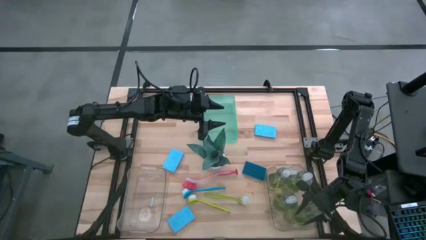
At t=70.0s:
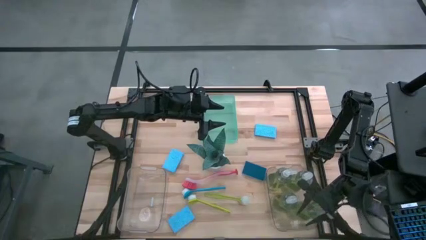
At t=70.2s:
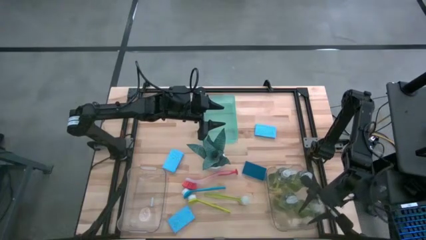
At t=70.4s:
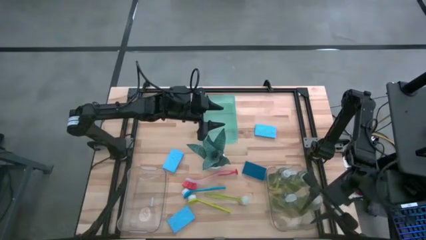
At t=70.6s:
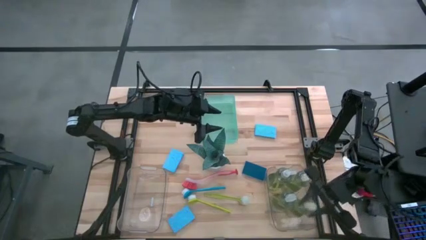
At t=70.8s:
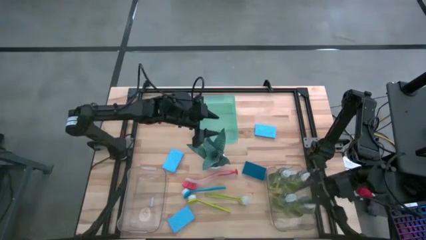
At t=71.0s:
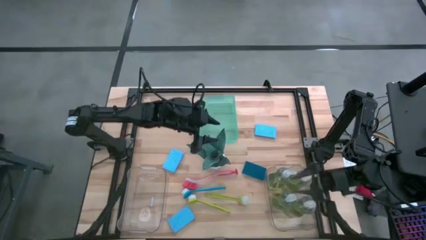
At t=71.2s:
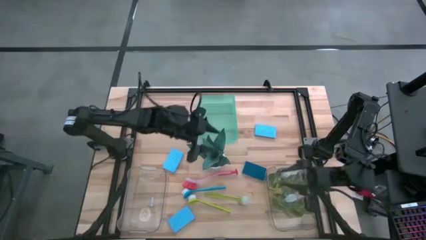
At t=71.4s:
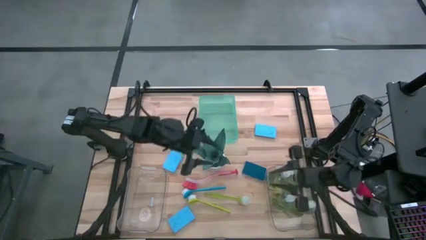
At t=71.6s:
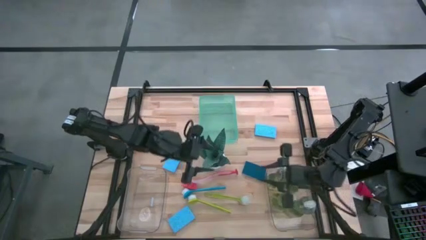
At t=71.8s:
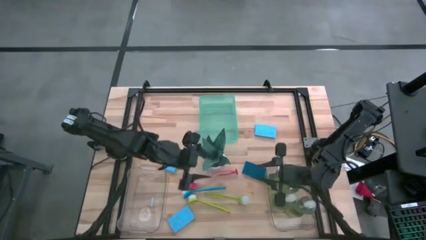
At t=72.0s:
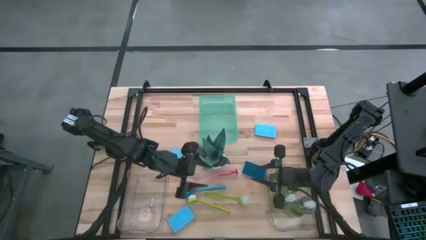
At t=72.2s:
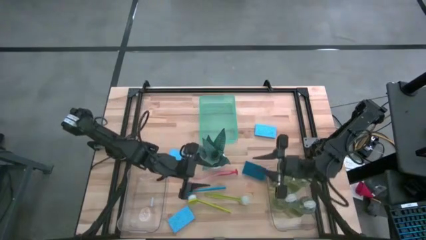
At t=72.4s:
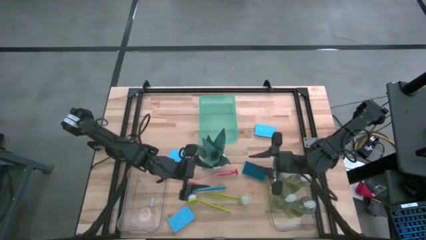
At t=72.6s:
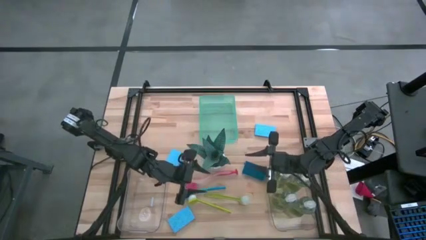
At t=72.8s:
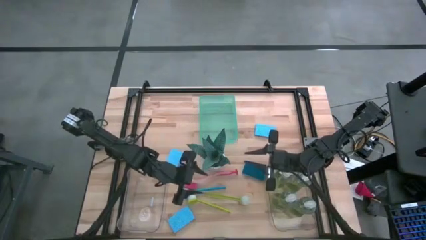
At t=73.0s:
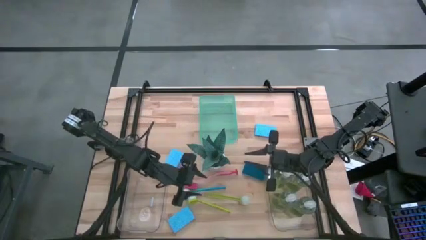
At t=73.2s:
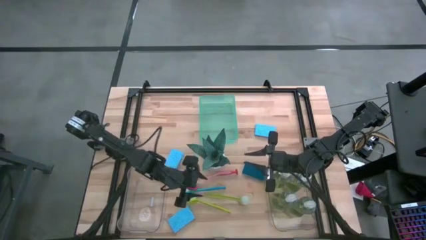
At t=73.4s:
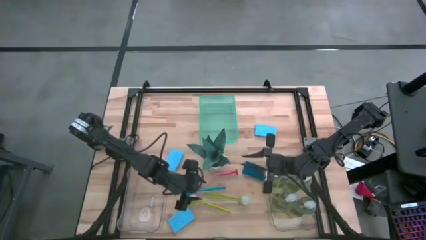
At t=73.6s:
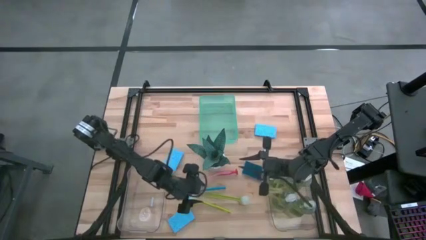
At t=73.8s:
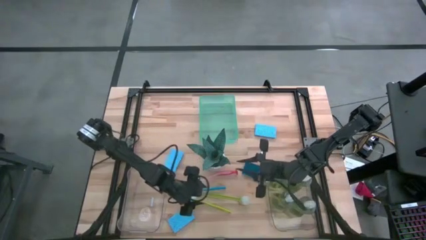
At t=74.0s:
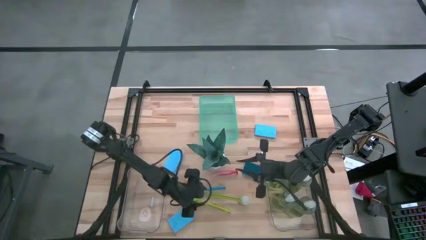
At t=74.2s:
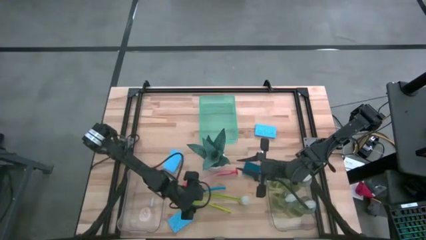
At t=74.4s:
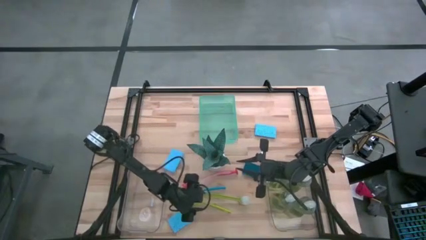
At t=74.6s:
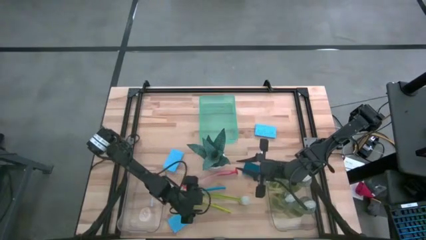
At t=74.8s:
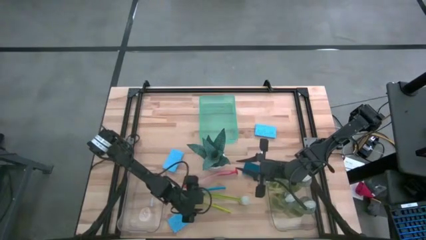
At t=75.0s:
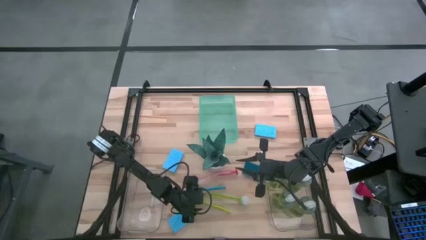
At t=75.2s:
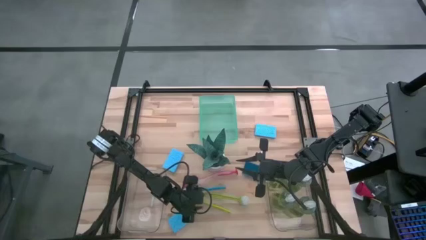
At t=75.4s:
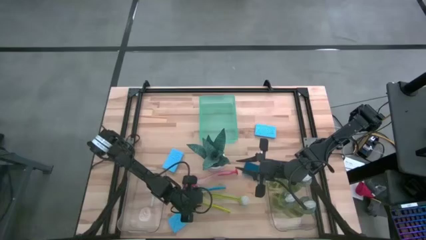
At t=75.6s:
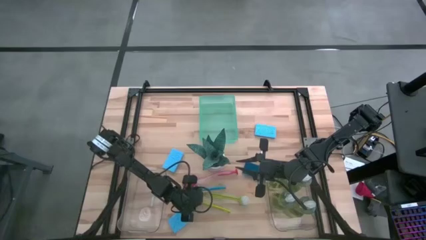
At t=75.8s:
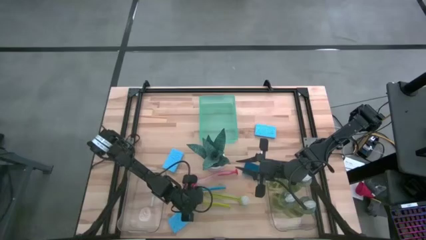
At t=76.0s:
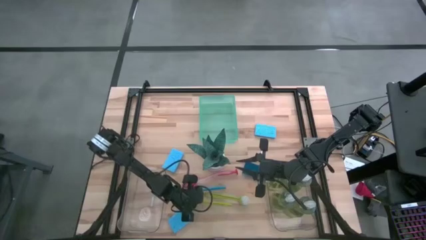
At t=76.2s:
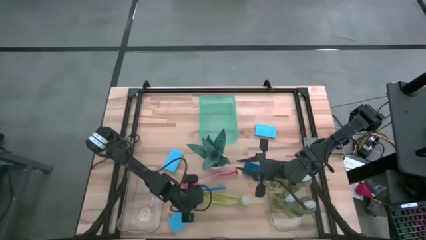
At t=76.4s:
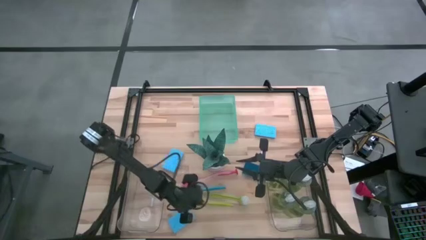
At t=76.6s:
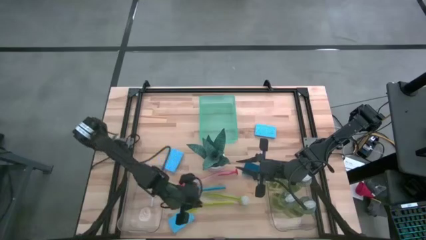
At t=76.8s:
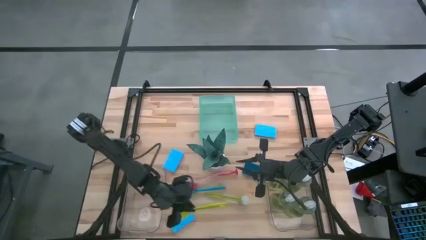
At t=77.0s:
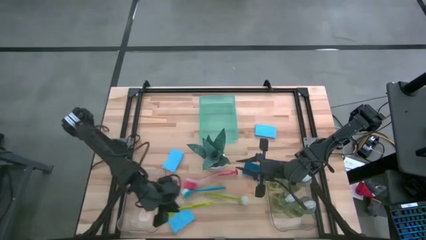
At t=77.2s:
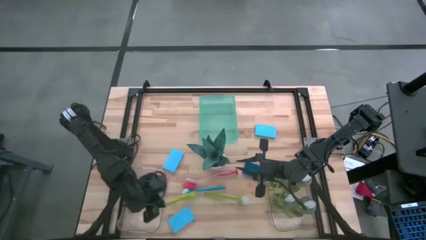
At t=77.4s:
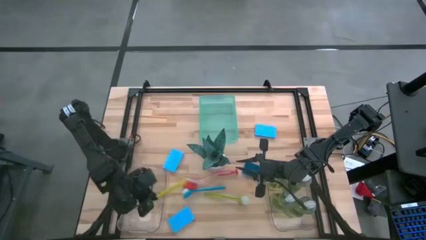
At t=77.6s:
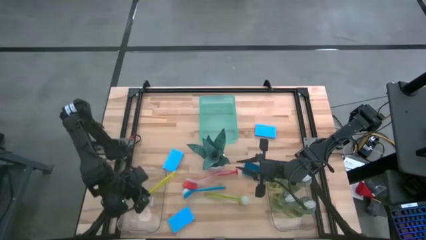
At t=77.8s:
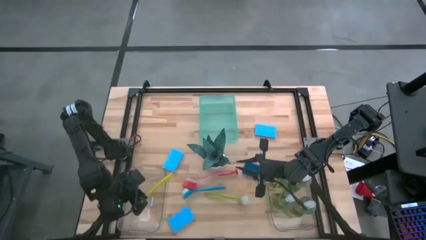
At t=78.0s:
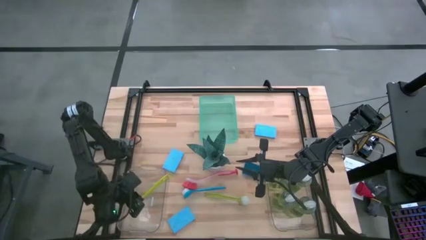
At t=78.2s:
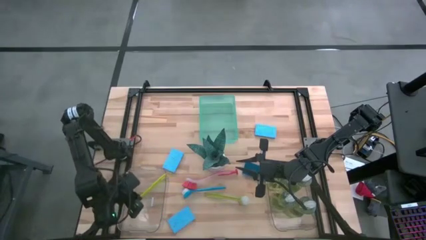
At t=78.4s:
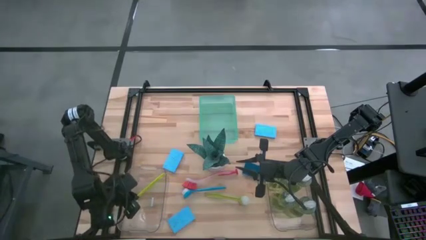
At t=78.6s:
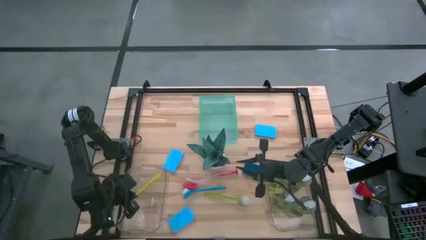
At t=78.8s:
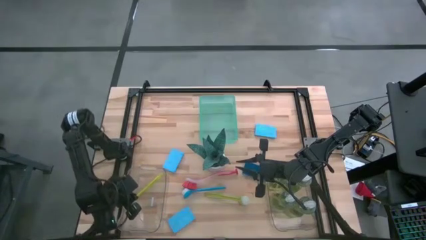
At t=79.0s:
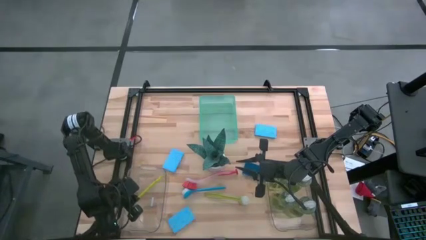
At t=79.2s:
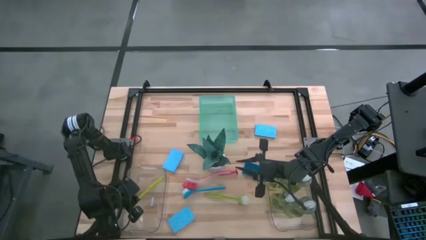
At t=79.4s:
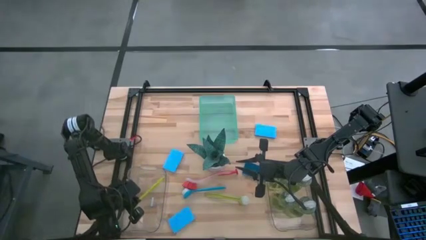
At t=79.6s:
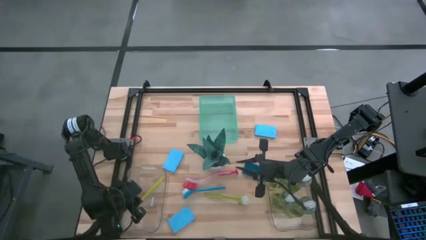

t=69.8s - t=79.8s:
Task: Pick & Place Kitchen Sink Supplies
Put the left green dish brush into the left transparent bin

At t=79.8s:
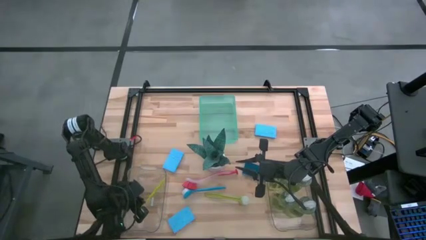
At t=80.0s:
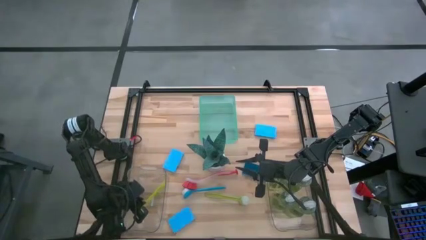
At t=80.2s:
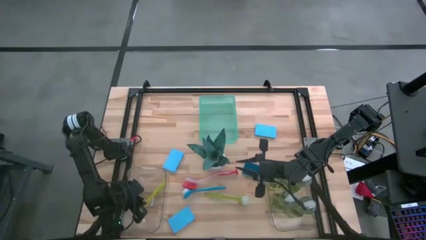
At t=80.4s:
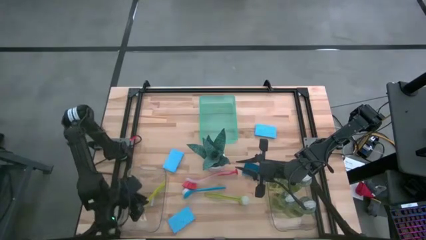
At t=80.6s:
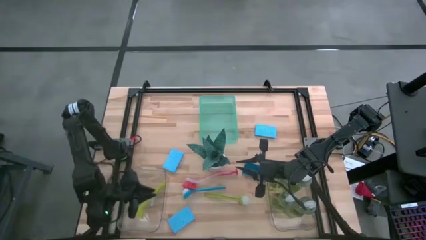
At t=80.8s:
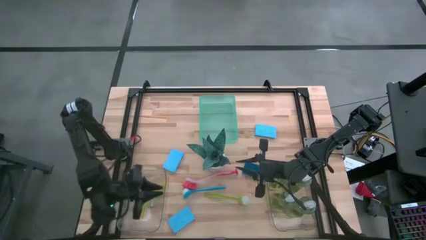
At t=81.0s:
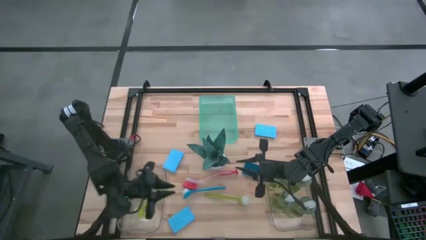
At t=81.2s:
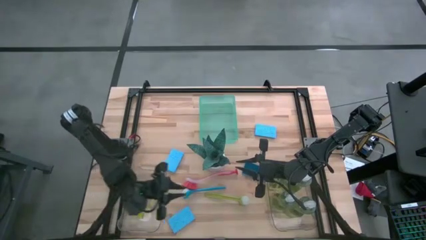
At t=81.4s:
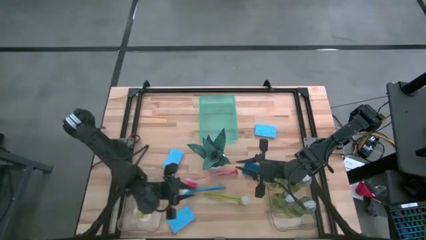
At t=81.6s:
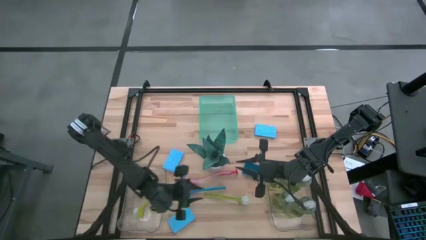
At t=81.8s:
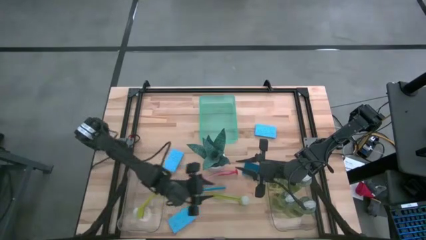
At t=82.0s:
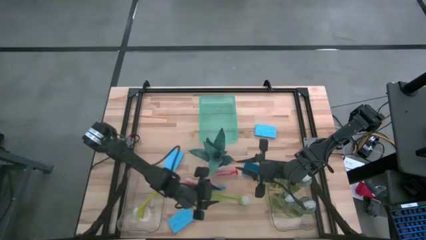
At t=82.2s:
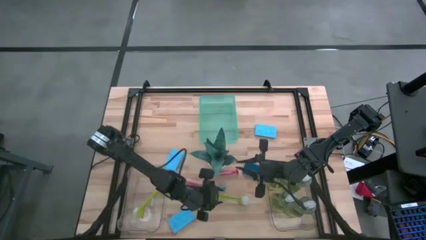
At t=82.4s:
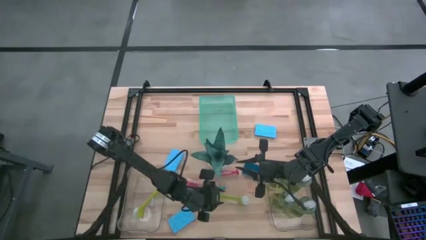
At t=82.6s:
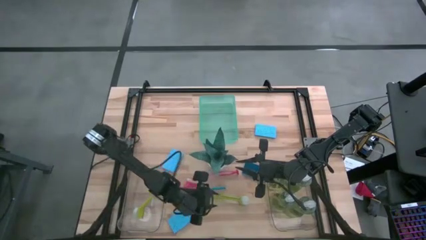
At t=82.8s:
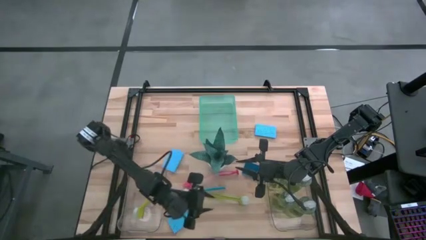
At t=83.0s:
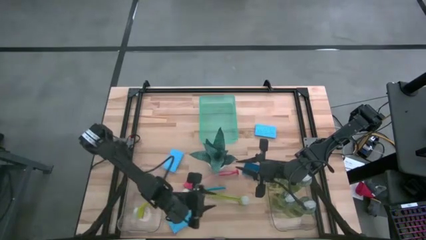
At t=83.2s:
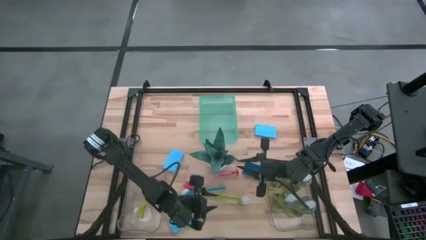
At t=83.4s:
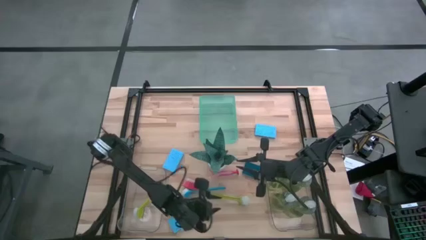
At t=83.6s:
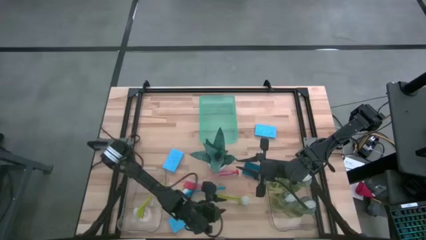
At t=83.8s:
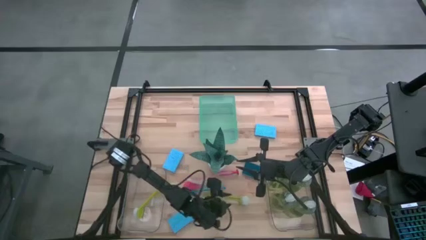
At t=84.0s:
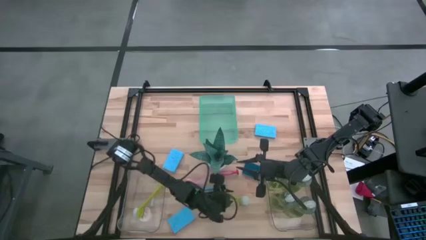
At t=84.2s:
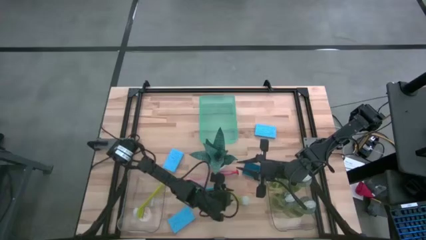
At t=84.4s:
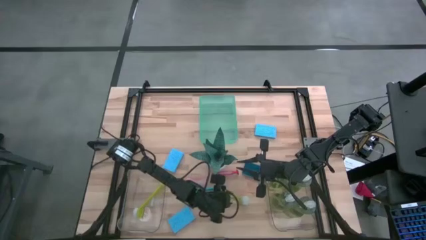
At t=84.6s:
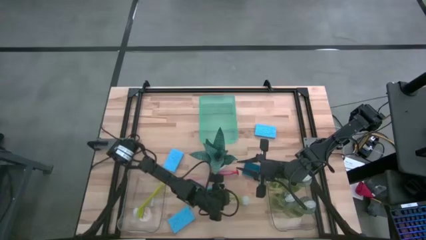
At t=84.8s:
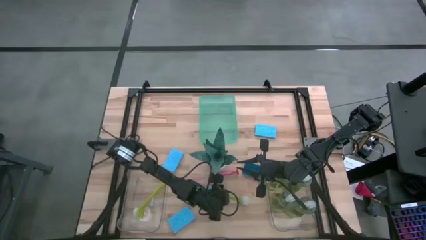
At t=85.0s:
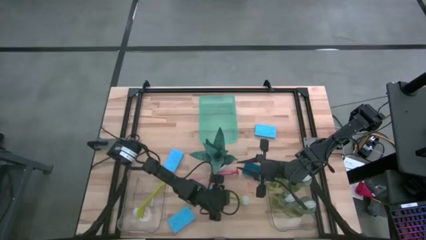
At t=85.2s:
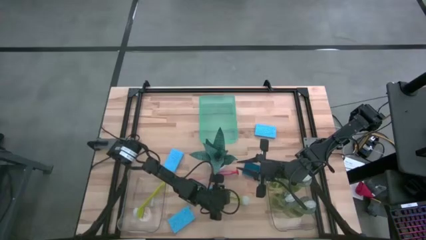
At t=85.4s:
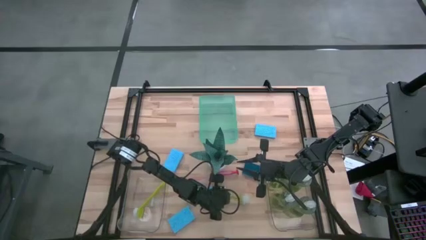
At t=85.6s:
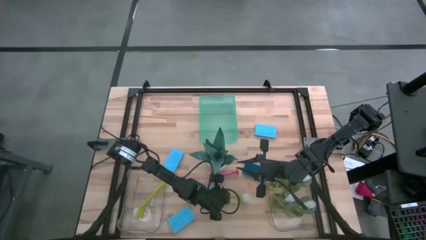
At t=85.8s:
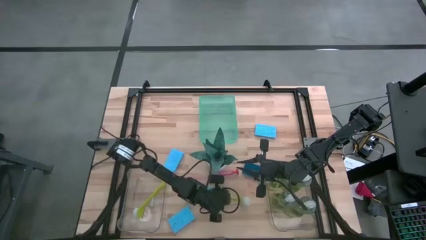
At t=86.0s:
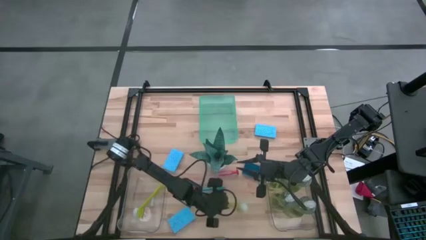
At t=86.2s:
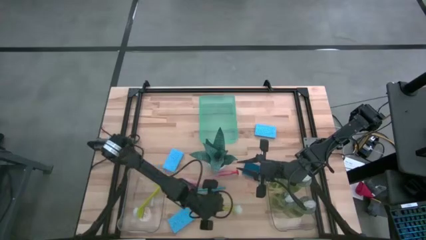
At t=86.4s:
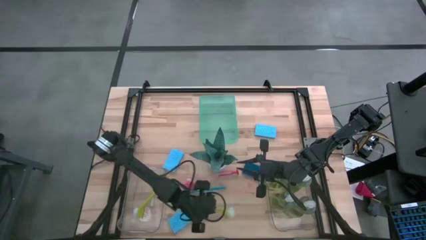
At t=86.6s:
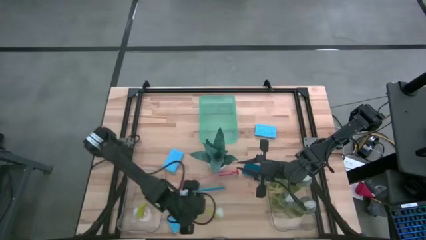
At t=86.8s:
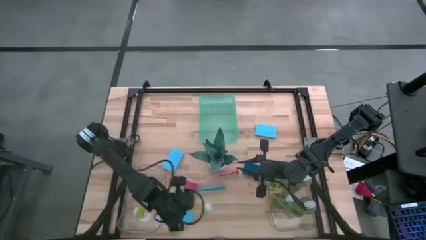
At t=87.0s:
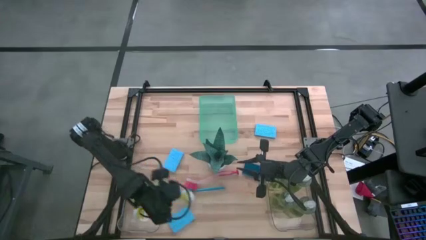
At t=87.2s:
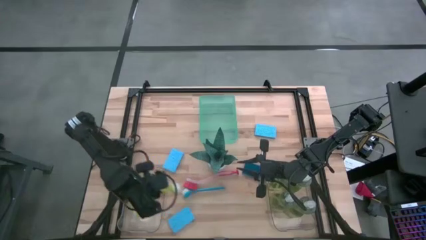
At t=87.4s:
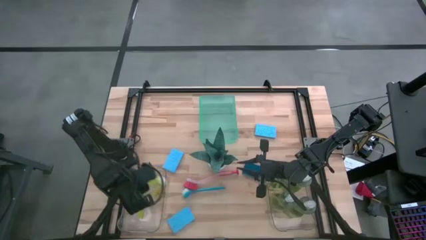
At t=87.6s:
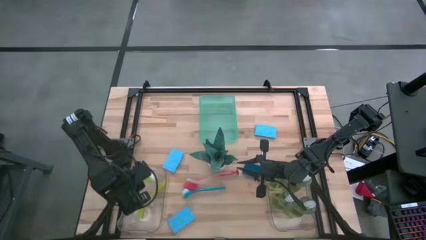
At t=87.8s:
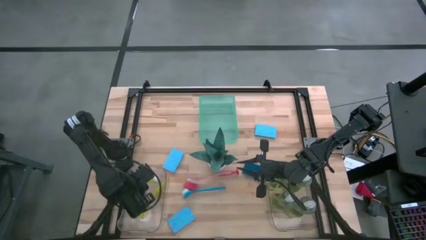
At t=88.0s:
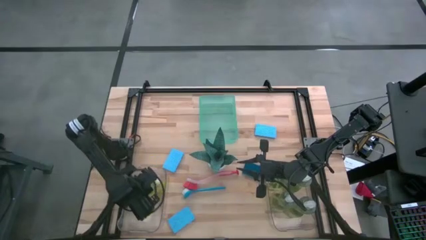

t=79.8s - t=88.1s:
Put the green dish brush into the left transparent bin
